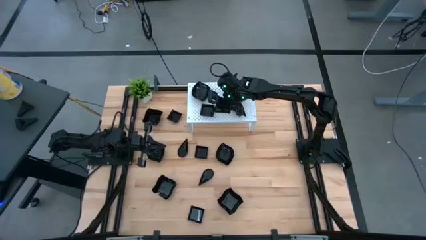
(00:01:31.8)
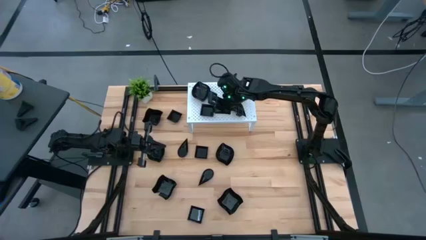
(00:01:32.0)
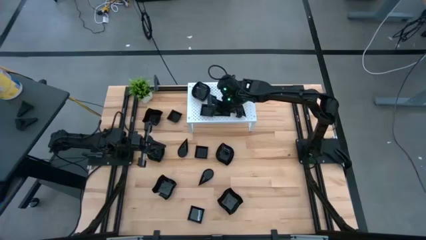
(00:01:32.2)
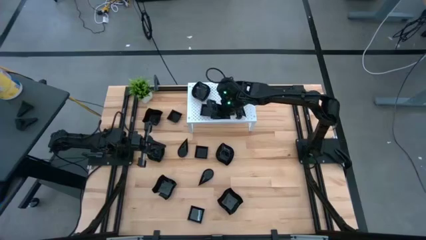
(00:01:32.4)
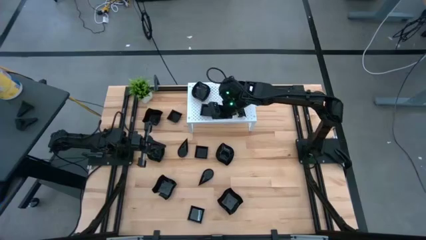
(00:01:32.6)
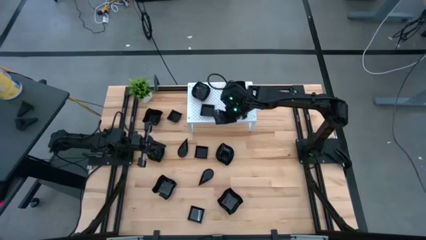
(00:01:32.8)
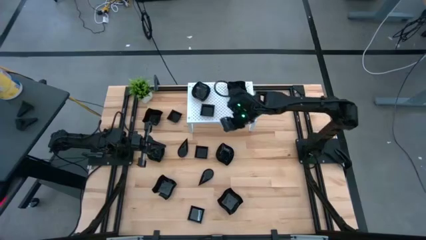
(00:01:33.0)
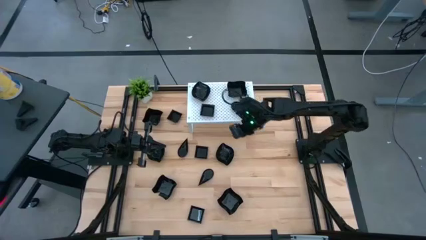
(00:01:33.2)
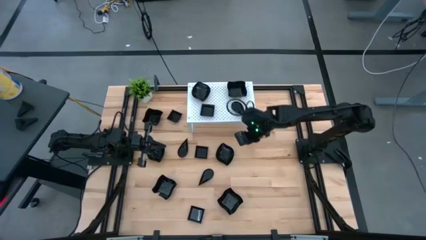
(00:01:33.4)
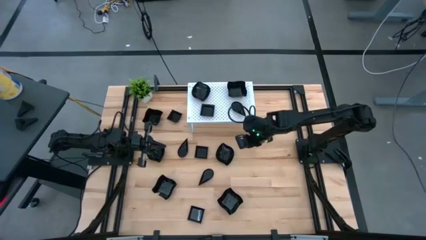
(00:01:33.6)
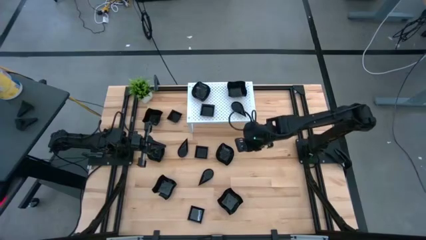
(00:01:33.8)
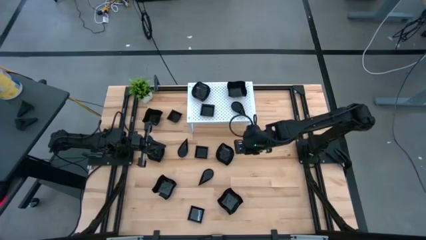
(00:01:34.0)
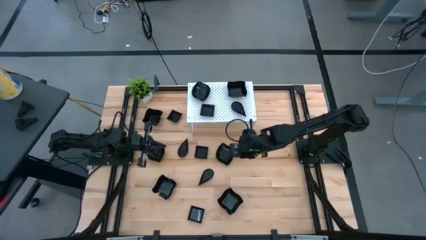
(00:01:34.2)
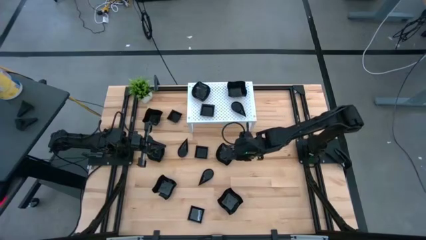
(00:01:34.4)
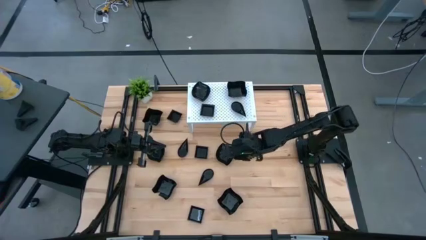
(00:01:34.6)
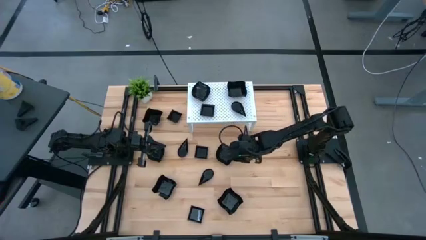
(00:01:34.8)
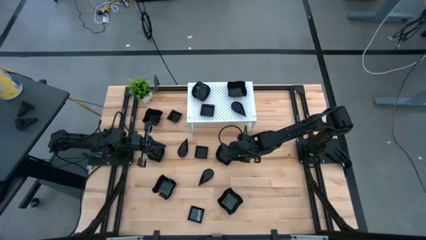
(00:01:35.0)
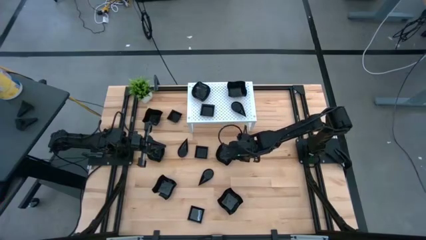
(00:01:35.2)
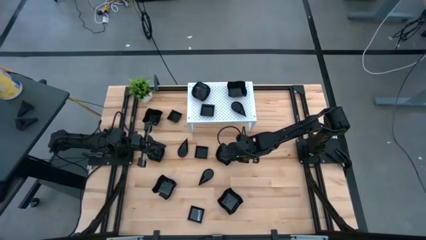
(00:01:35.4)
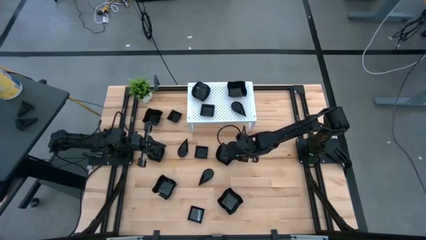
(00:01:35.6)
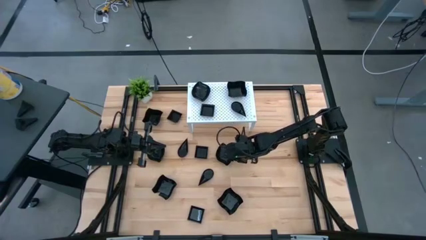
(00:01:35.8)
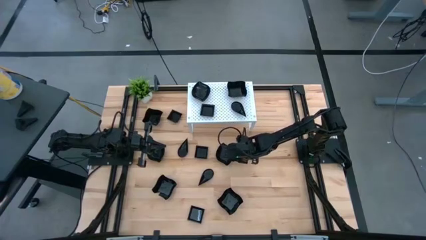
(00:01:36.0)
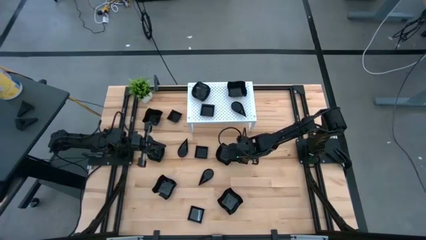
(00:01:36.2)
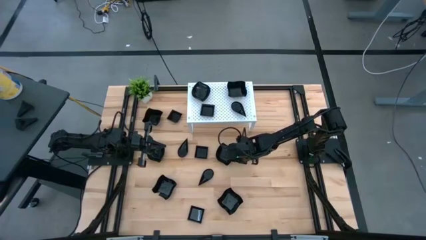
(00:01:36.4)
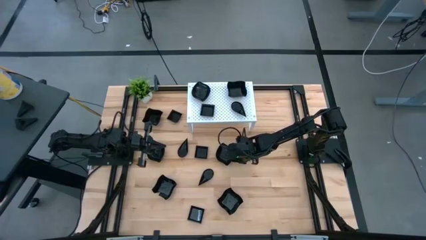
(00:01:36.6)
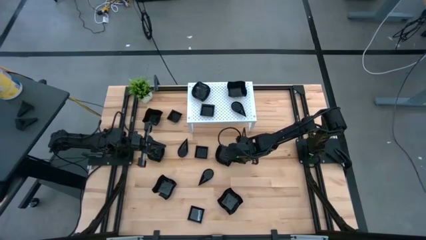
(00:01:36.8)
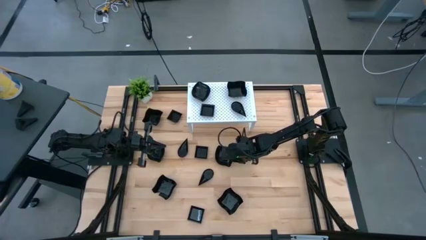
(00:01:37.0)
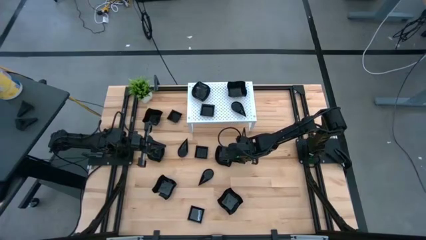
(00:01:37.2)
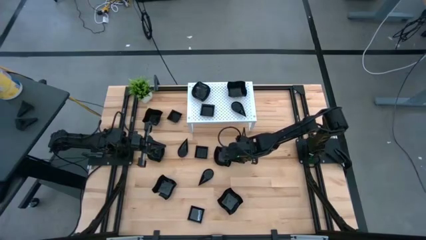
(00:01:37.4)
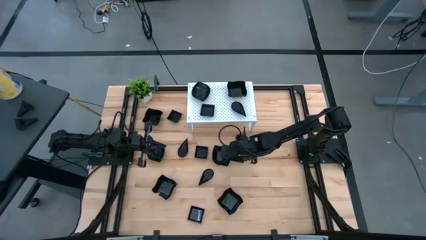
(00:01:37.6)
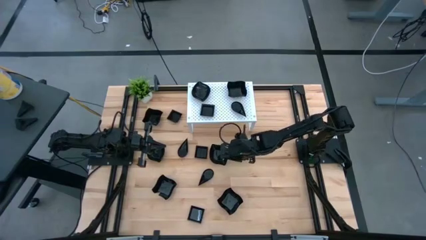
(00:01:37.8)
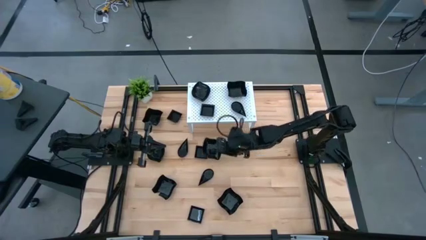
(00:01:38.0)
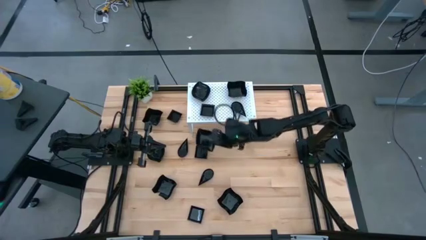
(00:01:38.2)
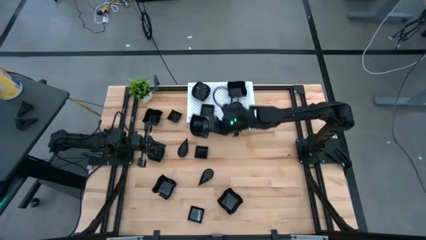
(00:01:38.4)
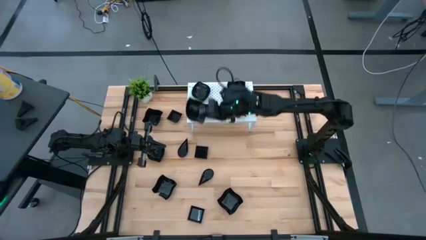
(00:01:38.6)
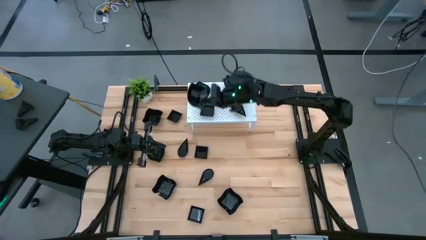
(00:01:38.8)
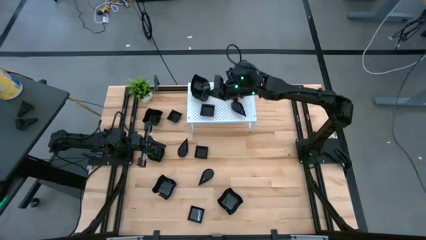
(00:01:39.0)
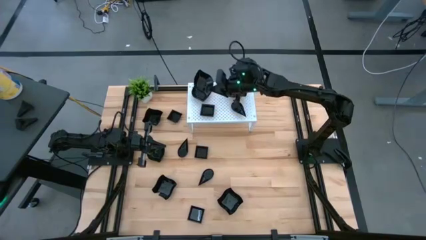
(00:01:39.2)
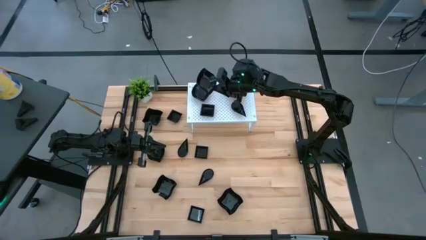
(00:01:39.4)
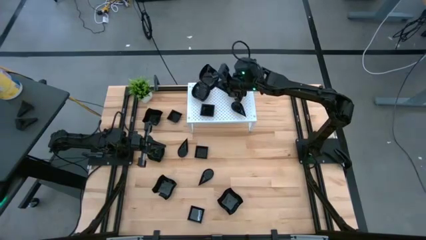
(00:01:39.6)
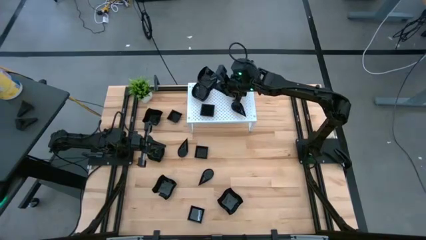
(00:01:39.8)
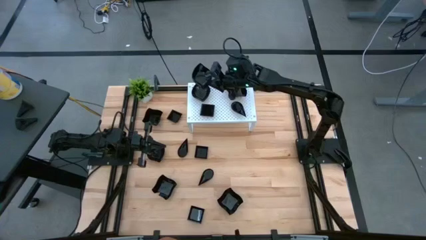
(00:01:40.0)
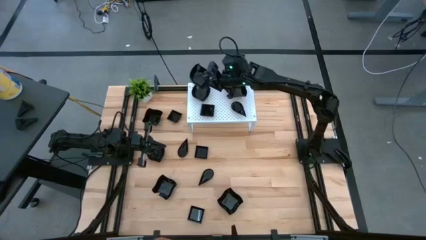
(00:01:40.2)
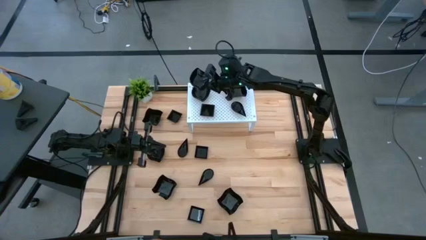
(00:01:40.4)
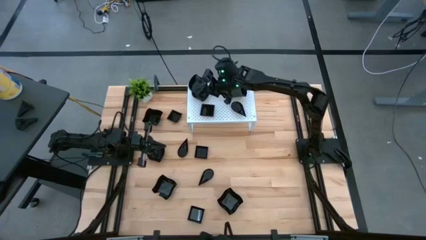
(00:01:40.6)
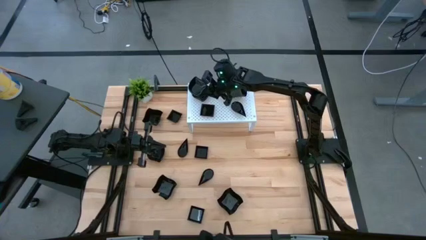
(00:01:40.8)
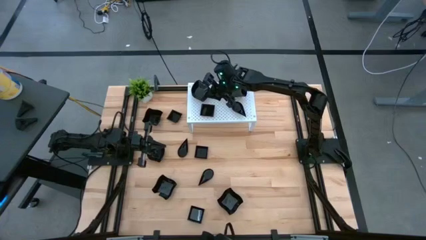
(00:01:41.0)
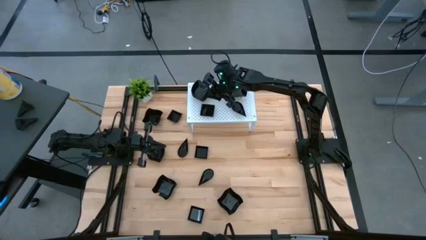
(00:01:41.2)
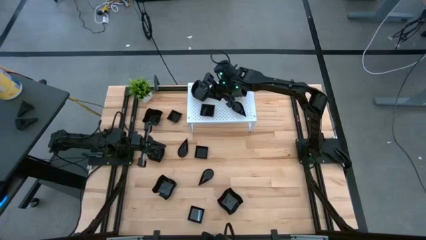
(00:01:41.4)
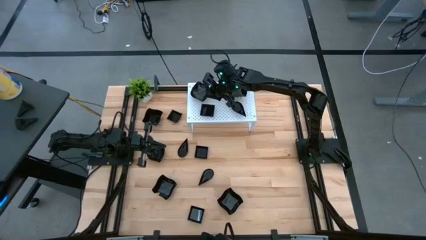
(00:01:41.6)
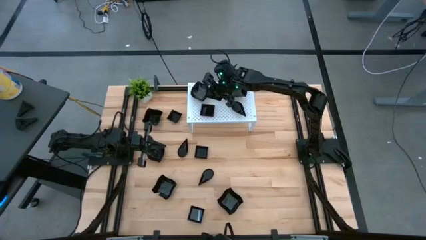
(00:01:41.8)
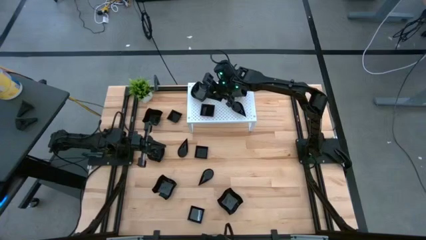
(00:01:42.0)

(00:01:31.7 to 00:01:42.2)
Task: Pick & Place Mini shaped plates
Stack the leaf-shaped plate on top of the leaf-shaped plate on the shelf

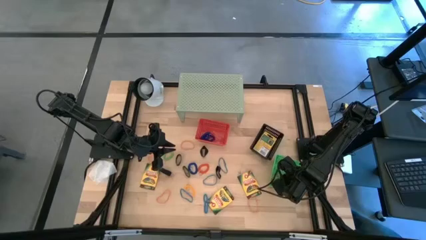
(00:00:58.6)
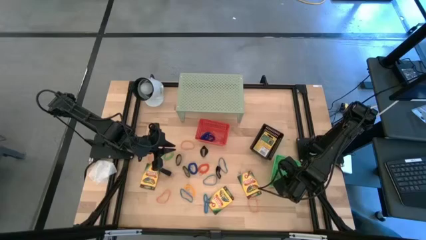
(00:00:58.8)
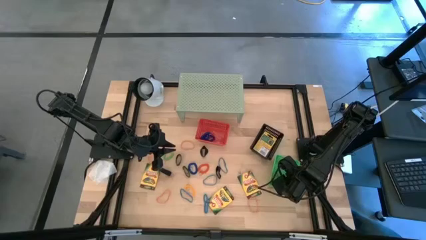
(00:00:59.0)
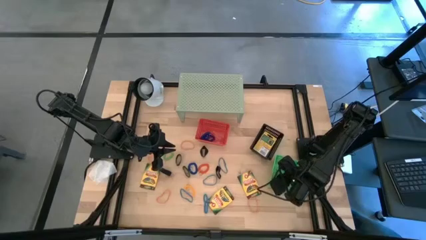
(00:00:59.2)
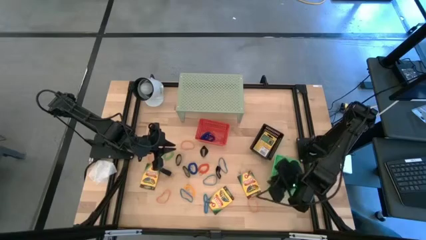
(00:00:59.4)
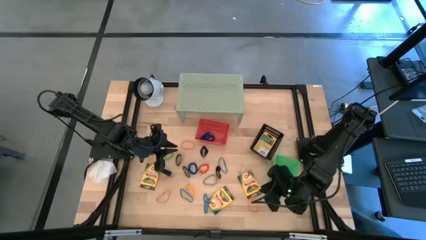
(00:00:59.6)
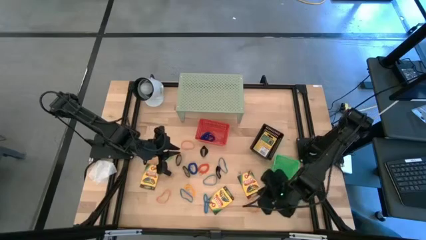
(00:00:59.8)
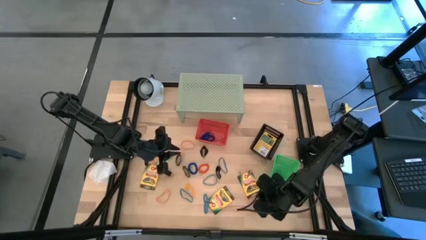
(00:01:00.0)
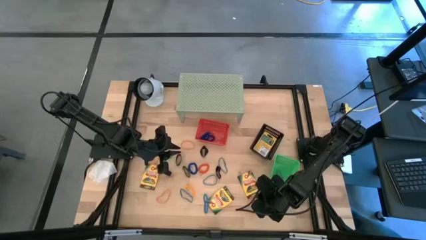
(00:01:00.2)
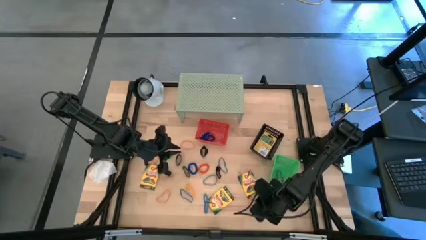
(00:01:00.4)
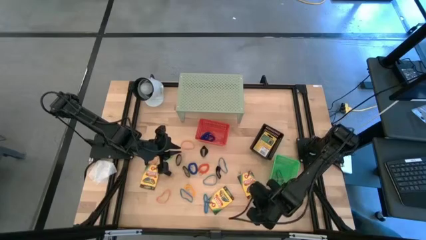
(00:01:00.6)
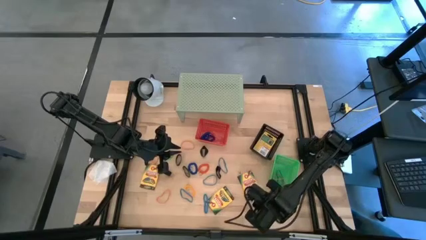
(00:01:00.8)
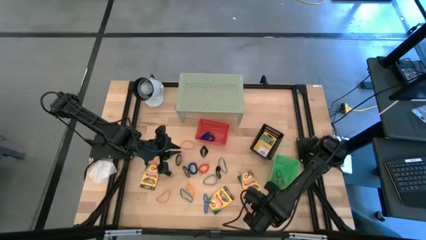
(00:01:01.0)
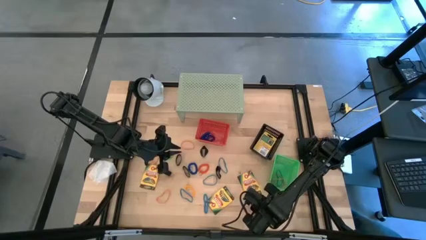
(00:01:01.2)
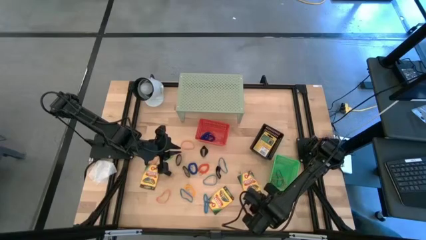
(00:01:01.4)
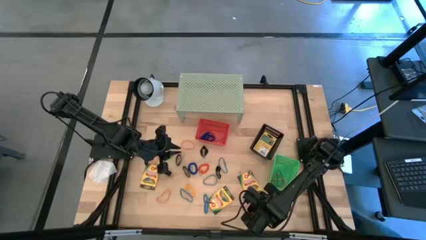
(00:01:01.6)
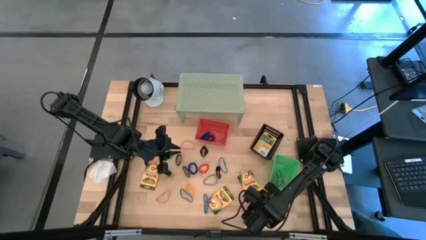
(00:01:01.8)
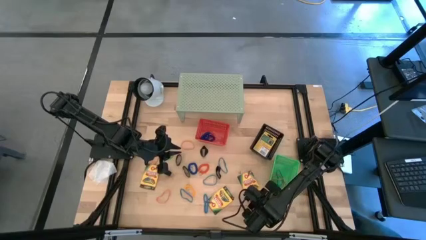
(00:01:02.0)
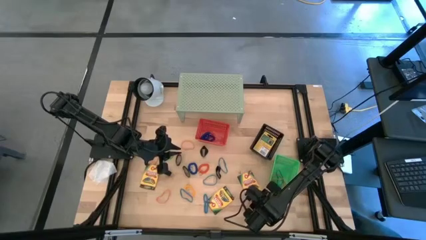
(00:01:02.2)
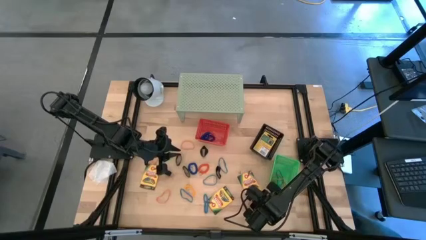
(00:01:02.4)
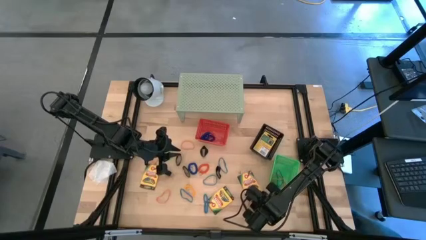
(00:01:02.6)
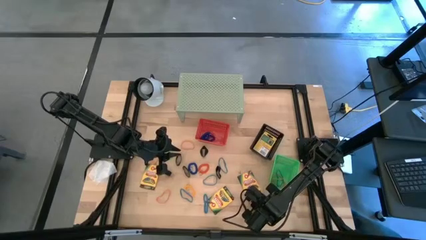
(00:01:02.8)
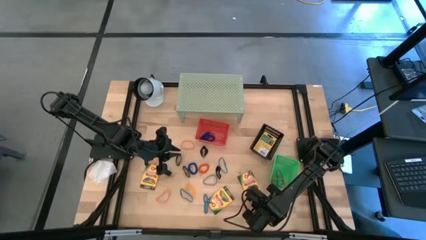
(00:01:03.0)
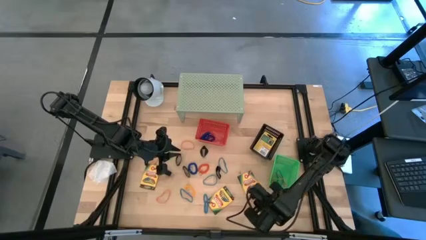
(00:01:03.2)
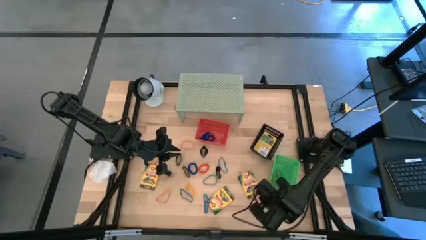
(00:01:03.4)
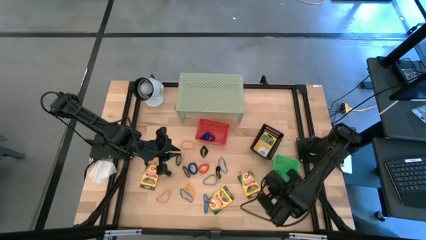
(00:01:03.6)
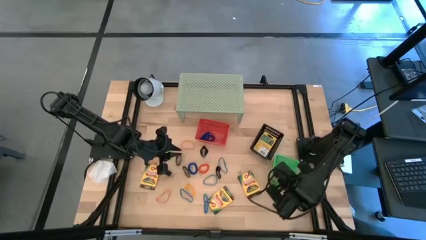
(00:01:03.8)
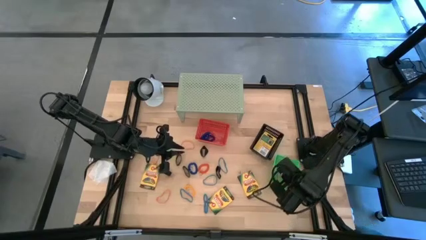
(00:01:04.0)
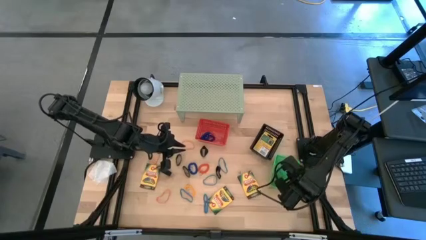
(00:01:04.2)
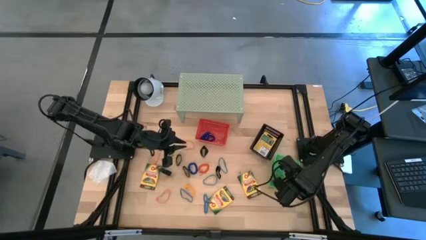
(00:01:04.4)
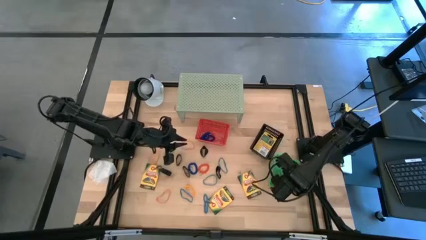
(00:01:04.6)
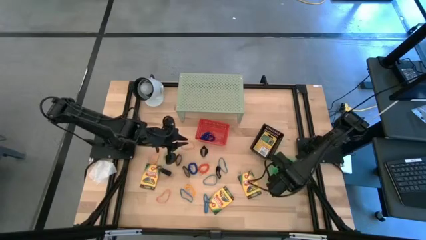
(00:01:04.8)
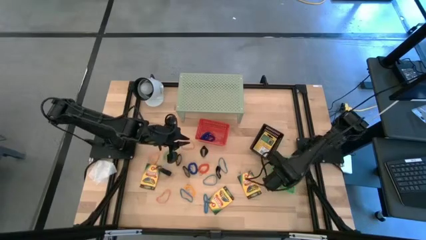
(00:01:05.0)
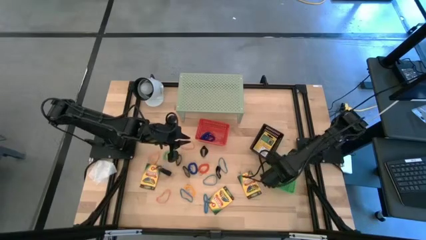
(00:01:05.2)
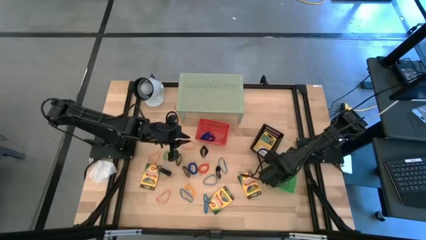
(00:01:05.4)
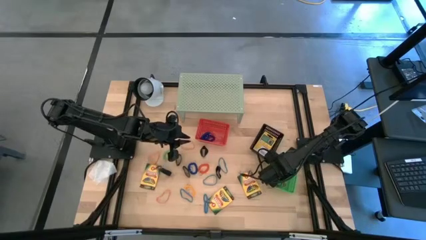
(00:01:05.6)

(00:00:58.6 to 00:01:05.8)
Task: Pick & Place Office Desk Supplies
Put the orange rubber band into the green bin
